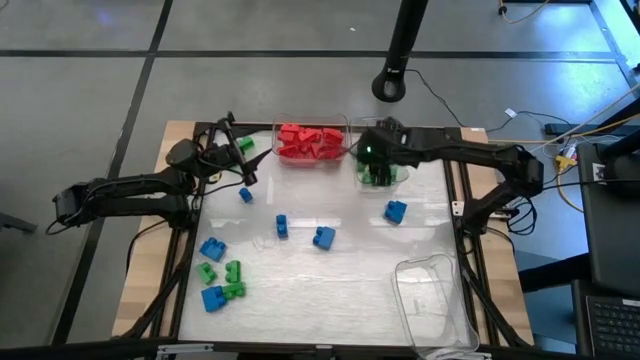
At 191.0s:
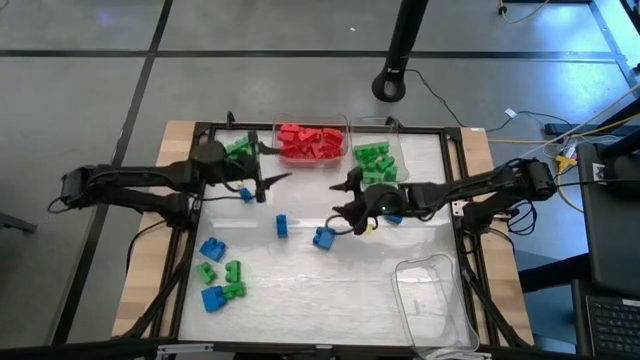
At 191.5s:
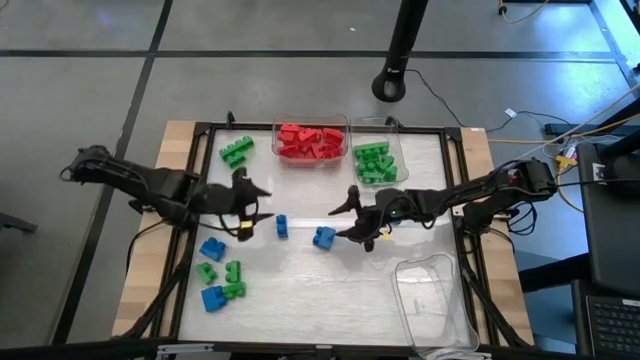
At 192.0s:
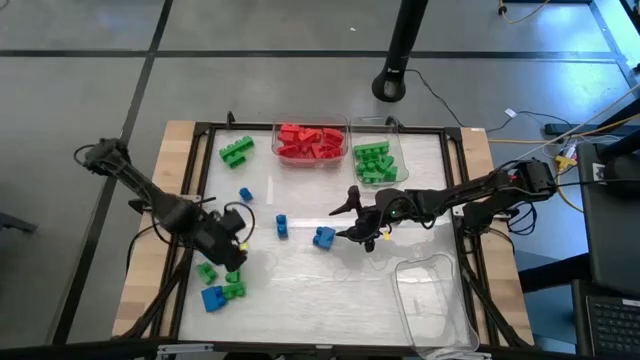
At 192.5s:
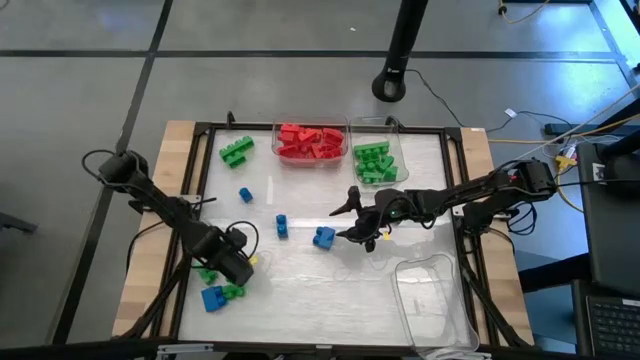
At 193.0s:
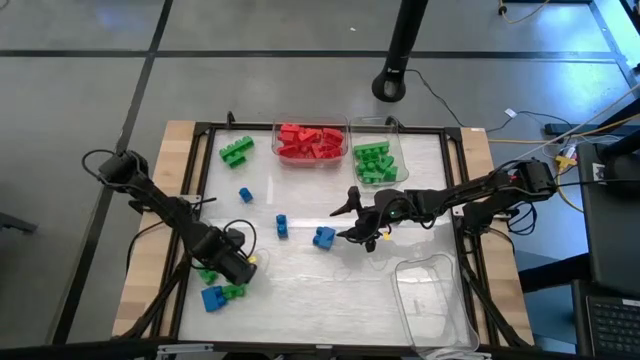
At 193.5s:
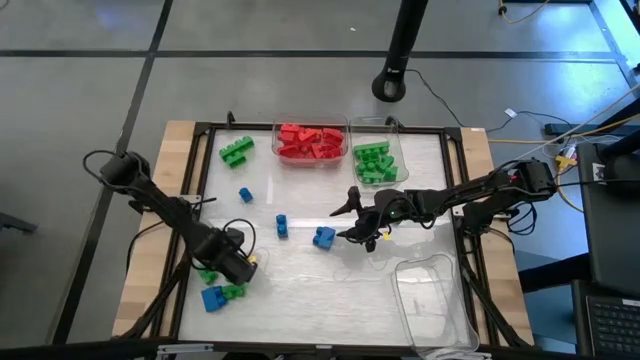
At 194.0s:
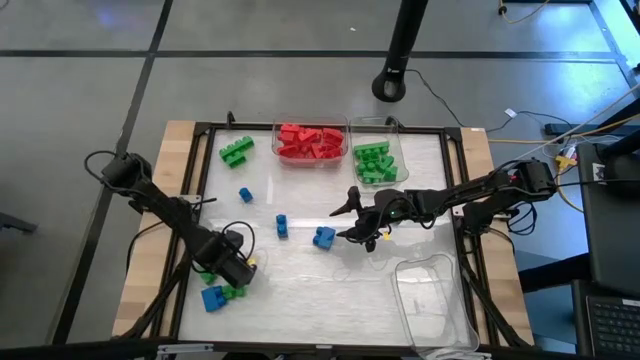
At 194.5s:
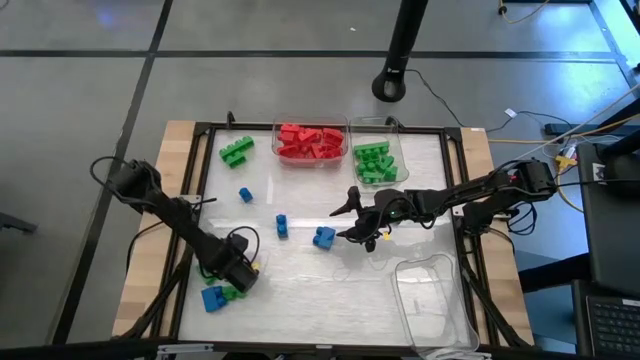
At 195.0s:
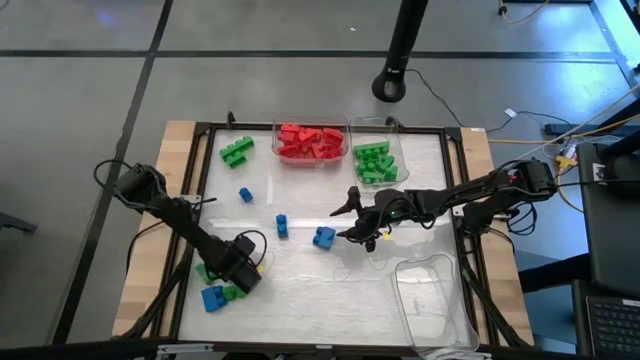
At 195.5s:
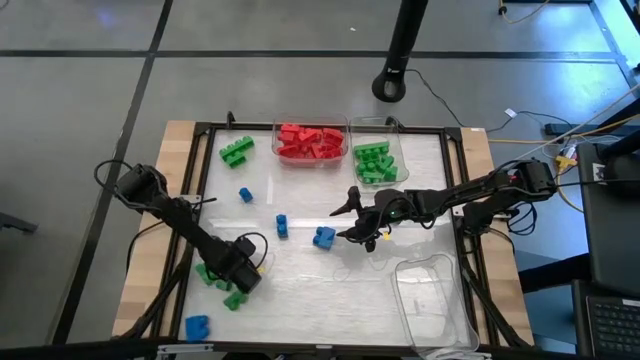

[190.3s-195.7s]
Task: Sort blocks
Put the green game piece into the top right transparent bin

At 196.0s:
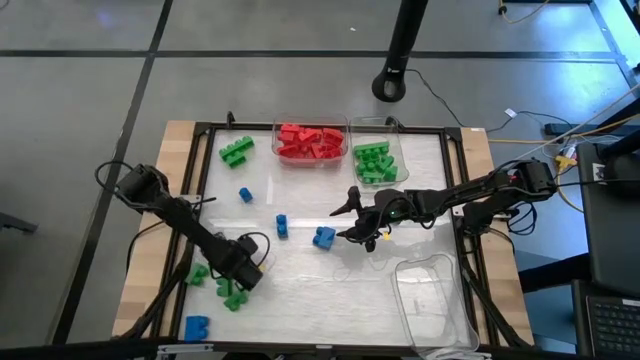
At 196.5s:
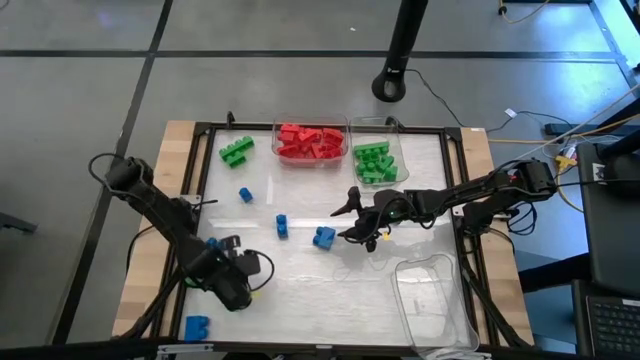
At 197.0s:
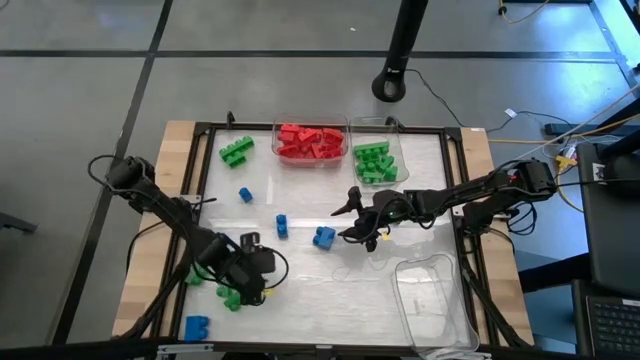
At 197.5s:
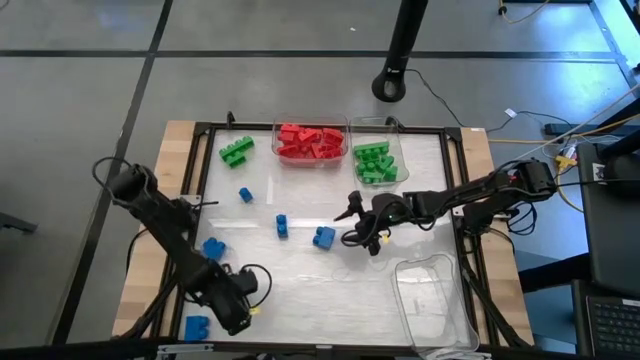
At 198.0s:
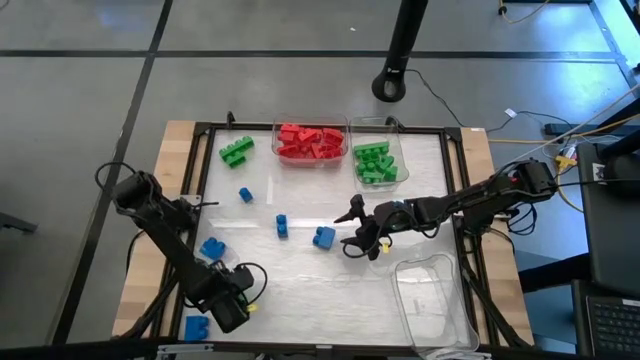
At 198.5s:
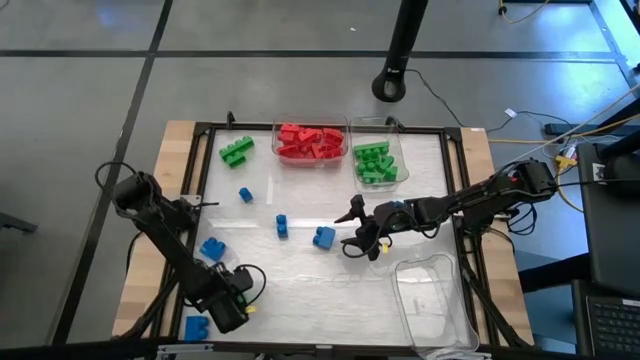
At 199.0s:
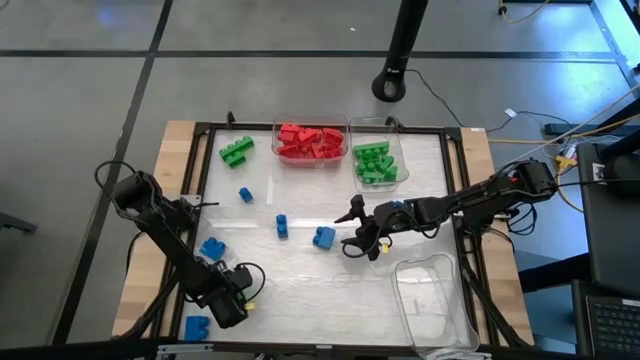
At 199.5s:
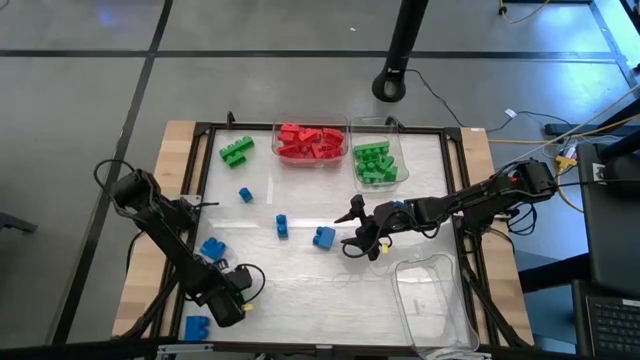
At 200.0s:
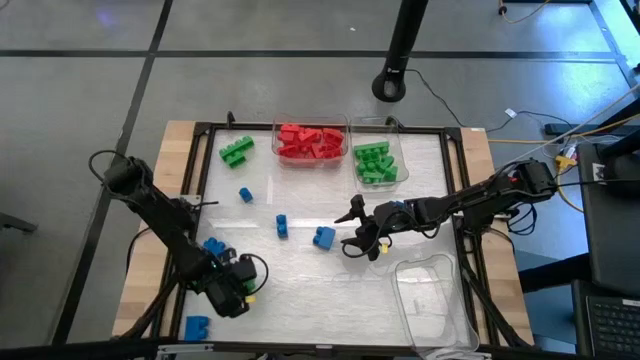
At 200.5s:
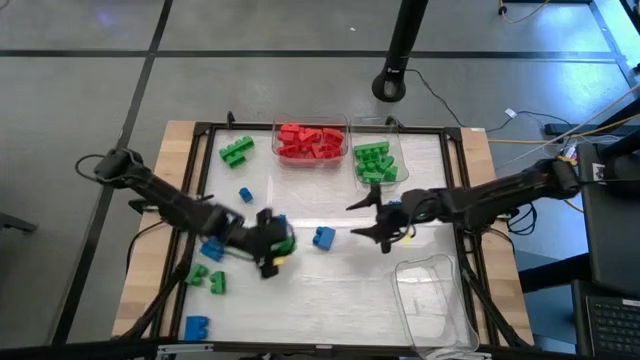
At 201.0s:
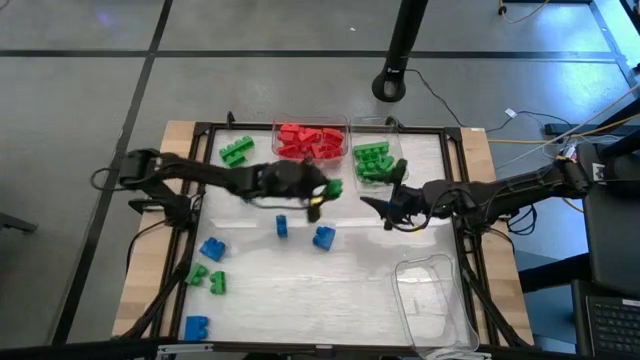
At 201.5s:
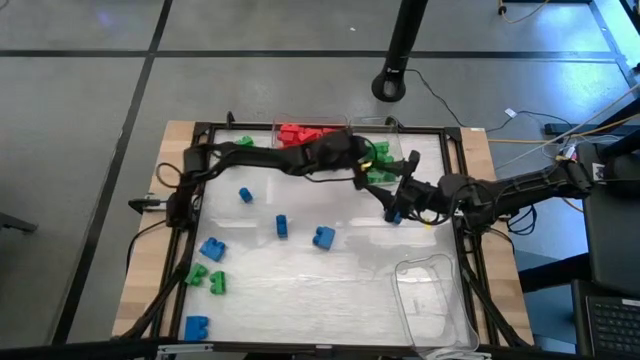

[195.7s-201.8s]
Put the green game piece into the top right transparent bin

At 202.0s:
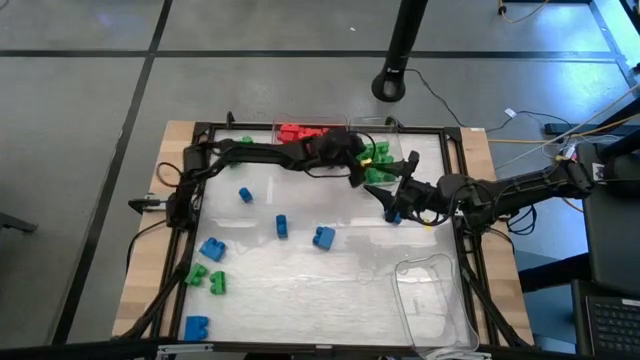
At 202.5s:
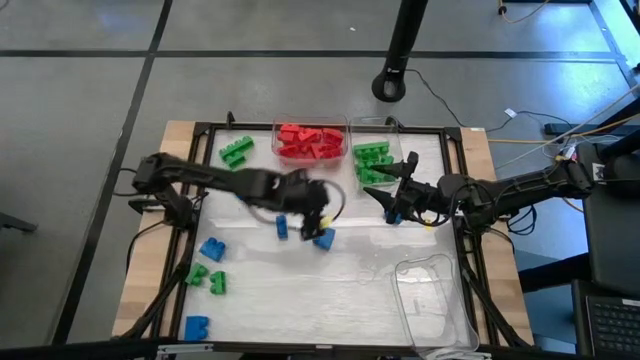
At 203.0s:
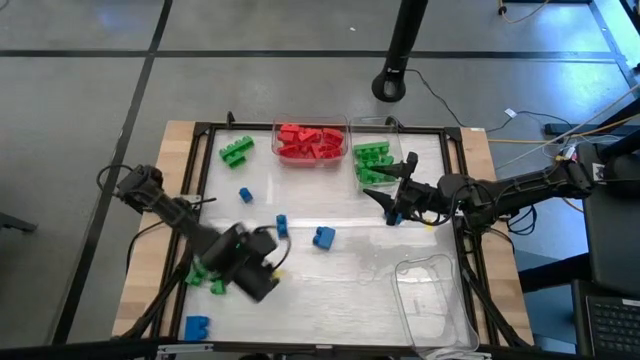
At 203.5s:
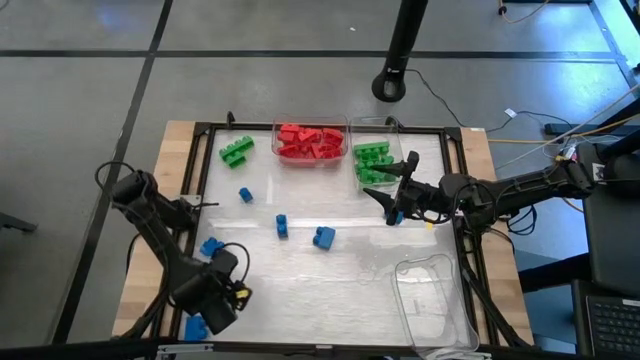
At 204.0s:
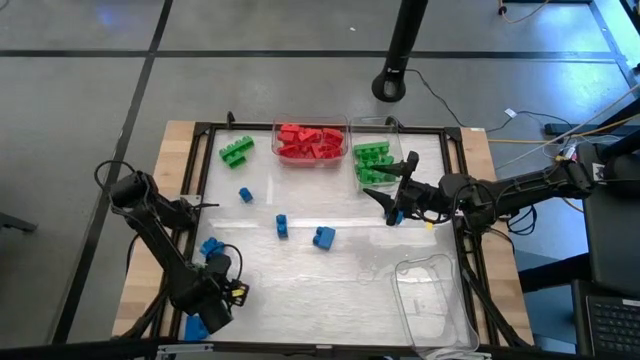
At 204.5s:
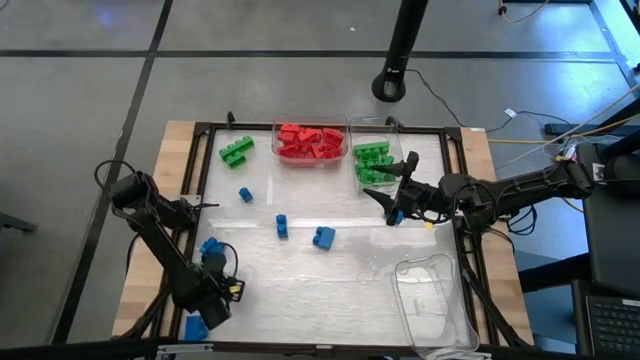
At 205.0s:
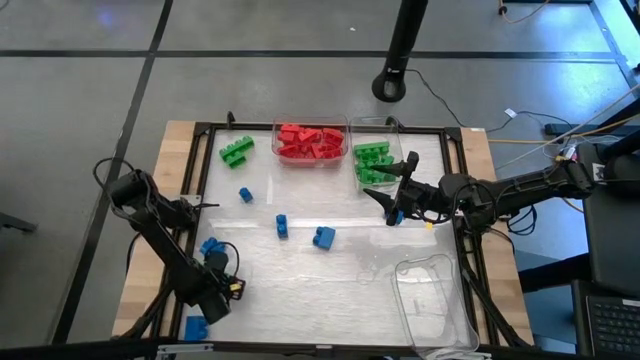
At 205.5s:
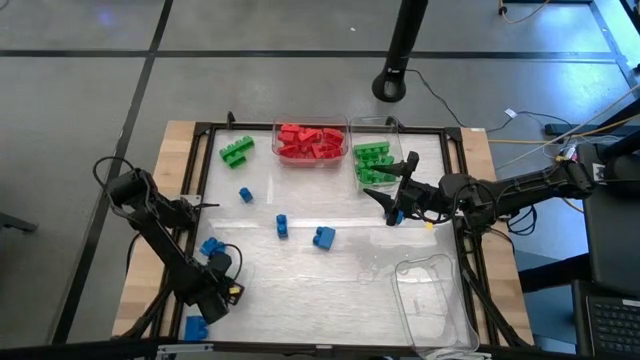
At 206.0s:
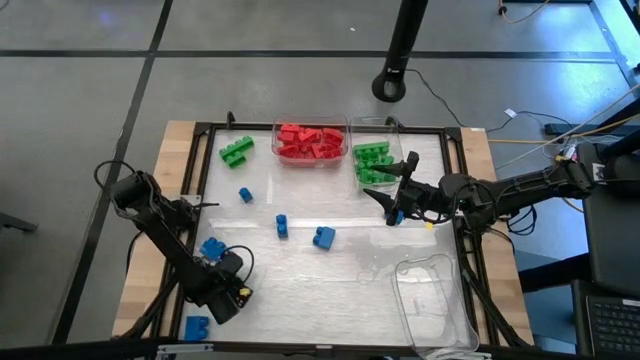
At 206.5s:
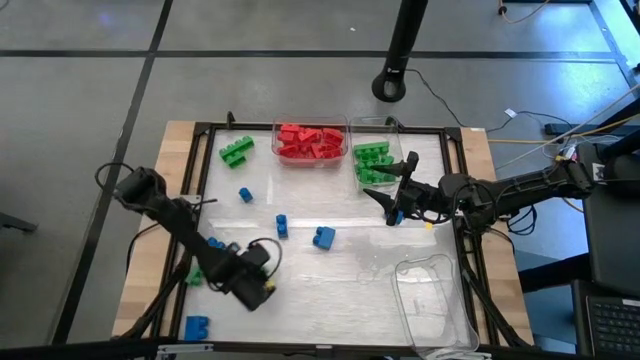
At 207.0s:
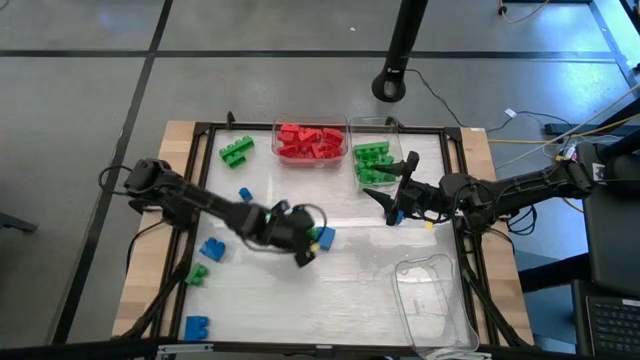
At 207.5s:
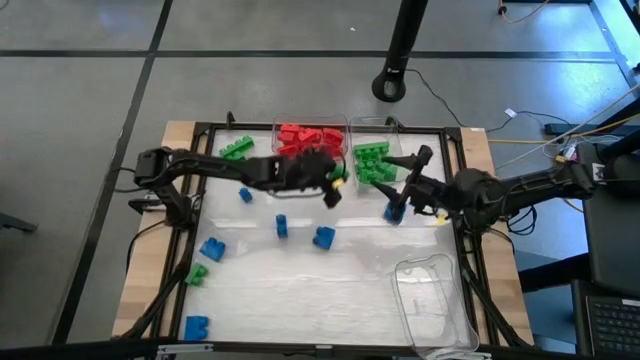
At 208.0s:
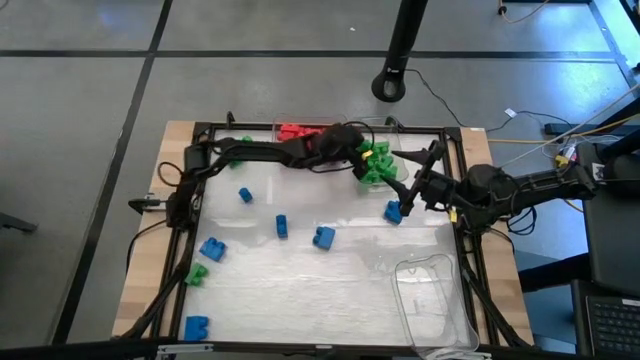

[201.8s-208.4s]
Put the green game piece into the top right transparent bin

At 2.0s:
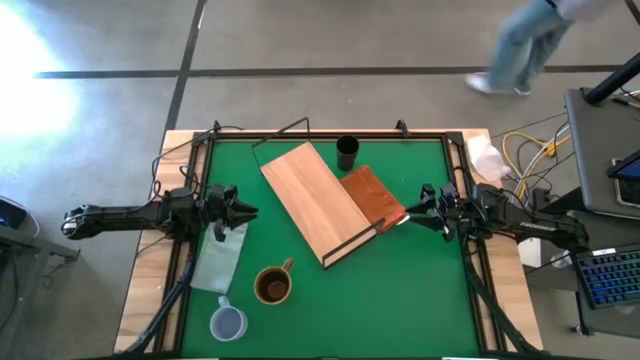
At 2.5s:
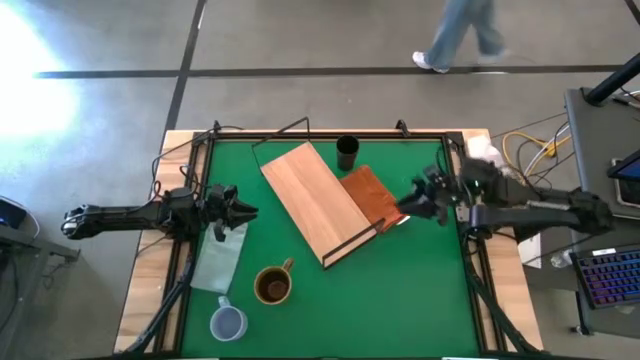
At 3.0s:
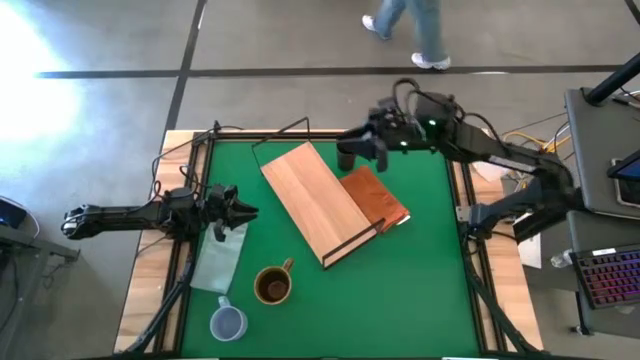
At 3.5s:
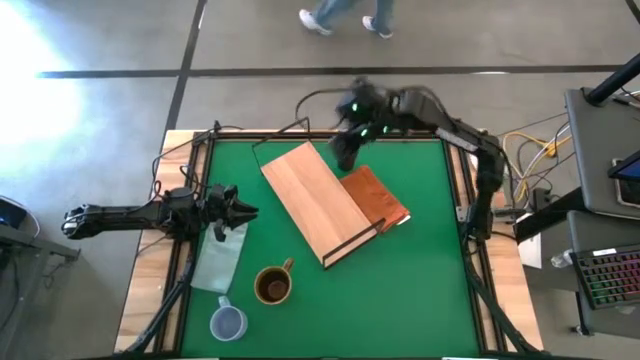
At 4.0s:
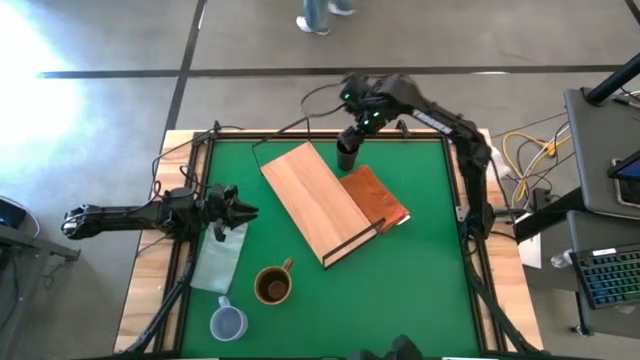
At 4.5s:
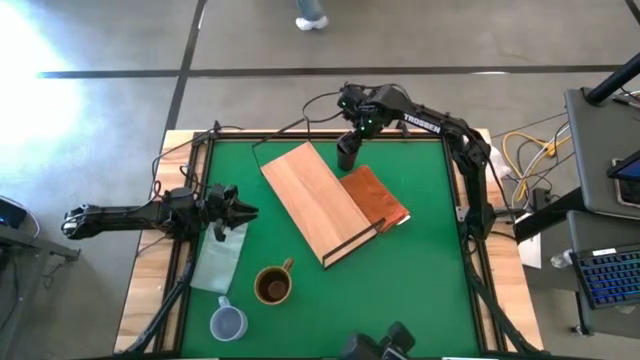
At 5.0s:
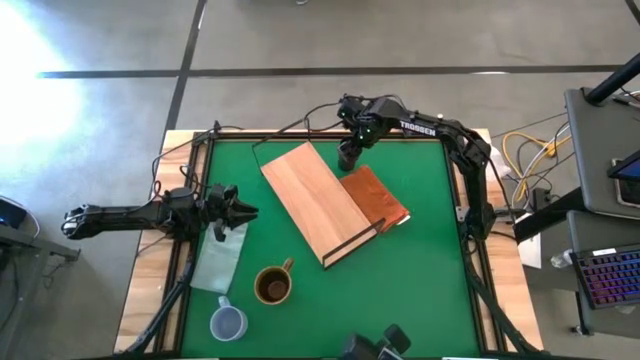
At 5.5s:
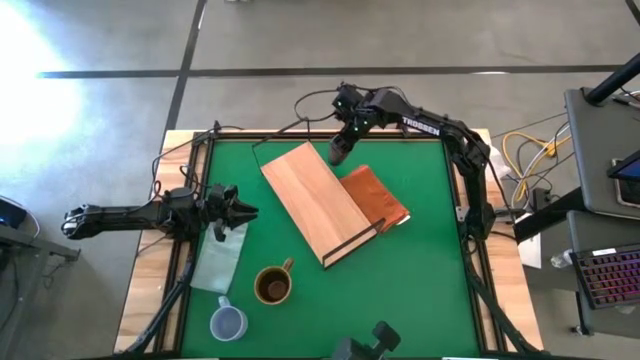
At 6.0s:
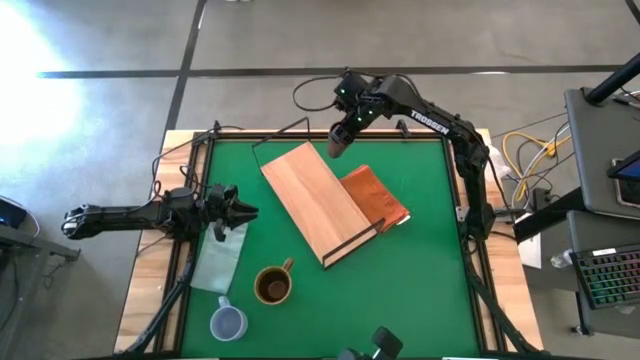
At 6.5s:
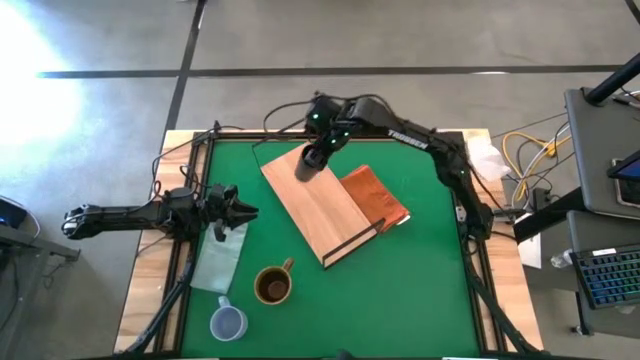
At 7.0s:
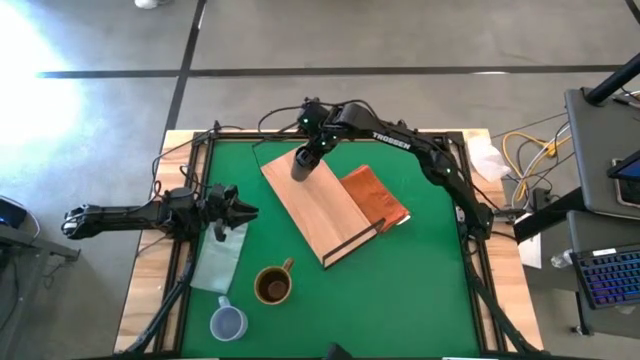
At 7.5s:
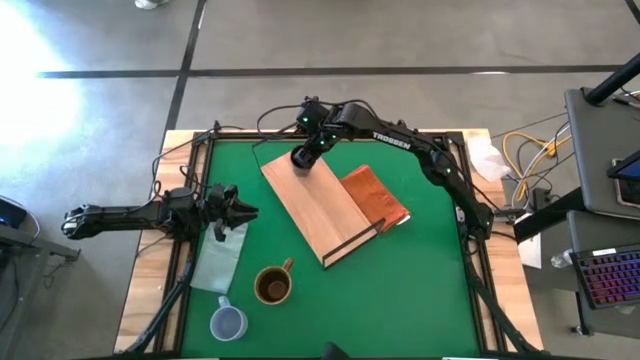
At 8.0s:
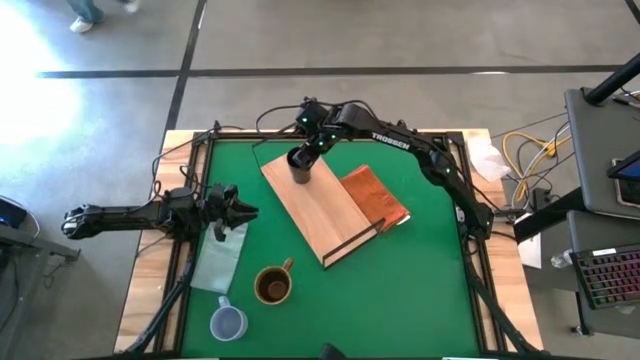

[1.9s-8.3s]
Task: Stack small to large cups/mugs on shelf
Put the black cup on the shelf
